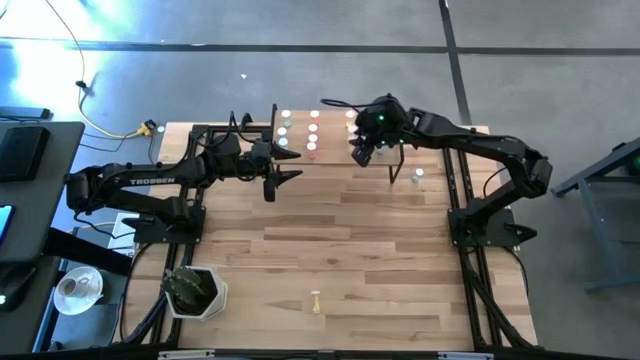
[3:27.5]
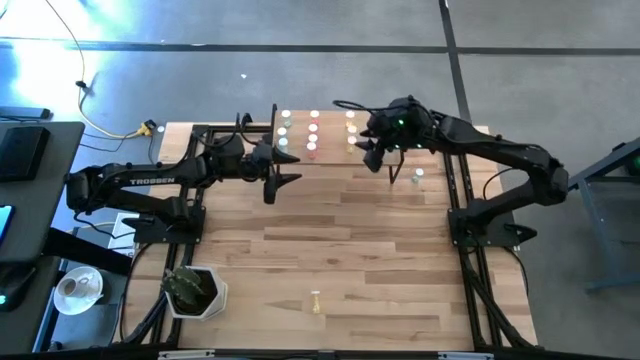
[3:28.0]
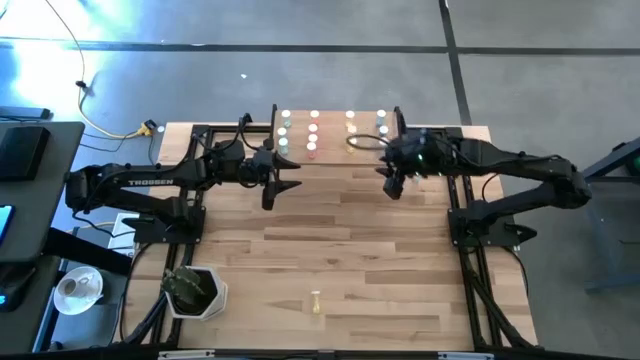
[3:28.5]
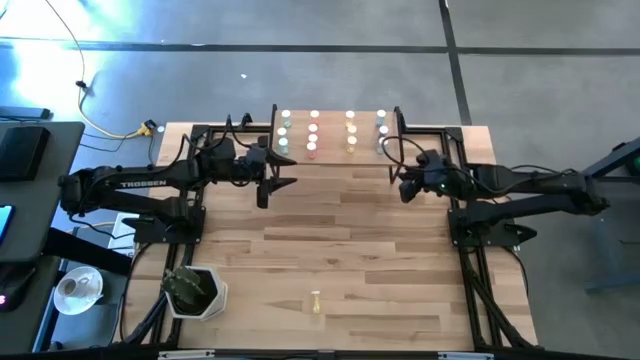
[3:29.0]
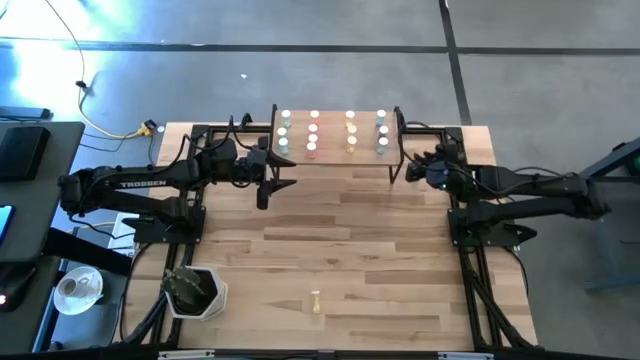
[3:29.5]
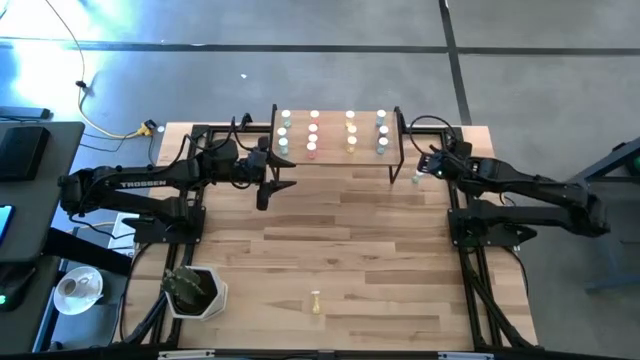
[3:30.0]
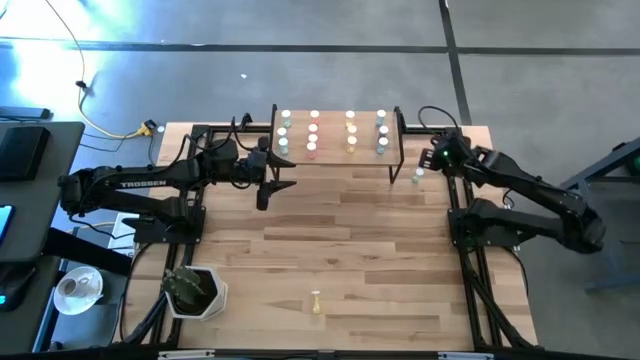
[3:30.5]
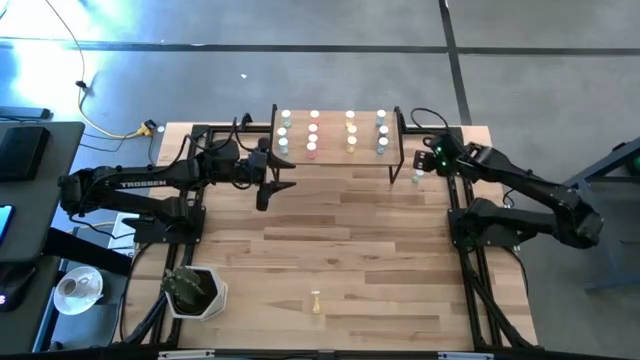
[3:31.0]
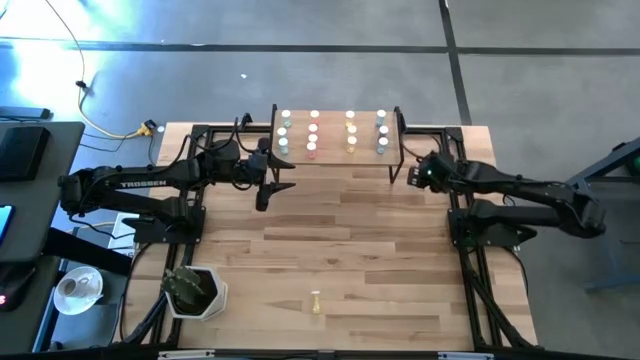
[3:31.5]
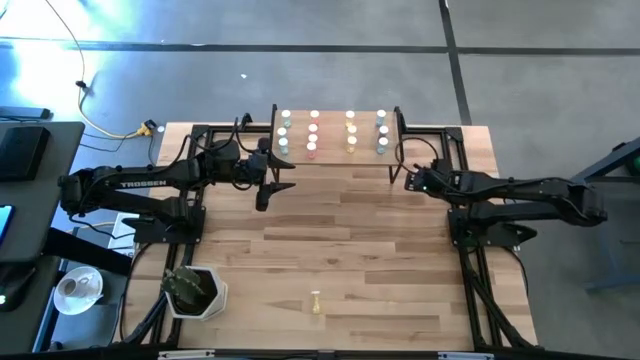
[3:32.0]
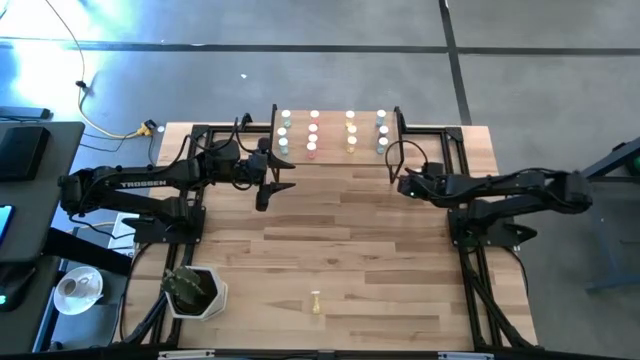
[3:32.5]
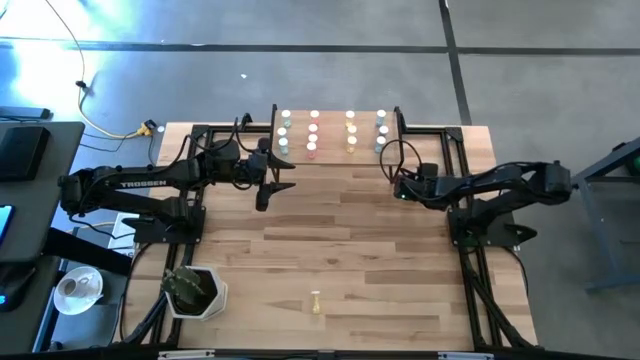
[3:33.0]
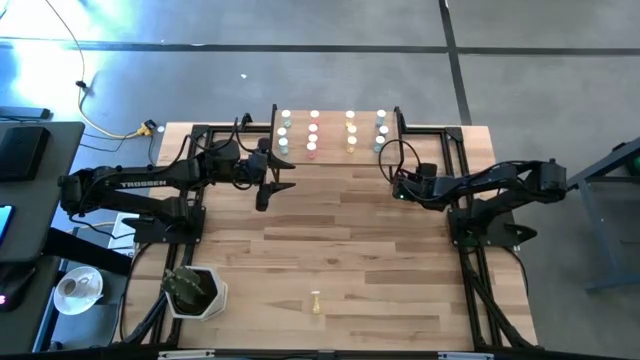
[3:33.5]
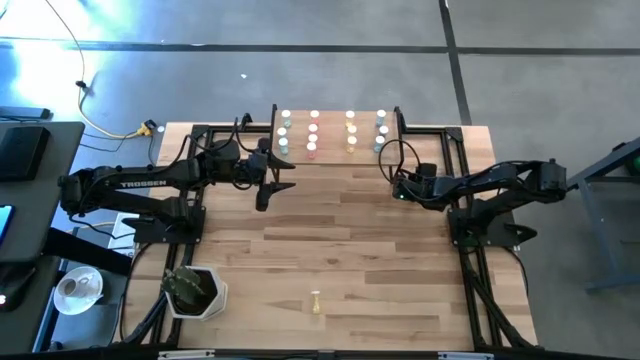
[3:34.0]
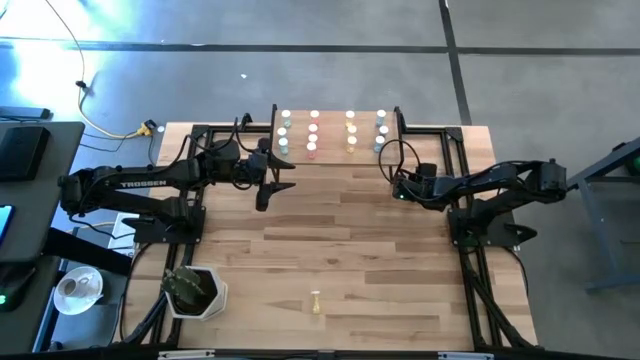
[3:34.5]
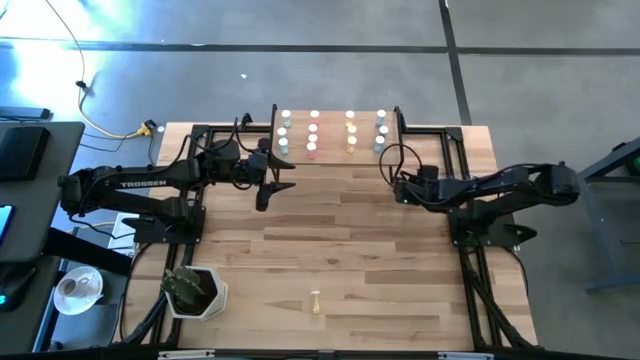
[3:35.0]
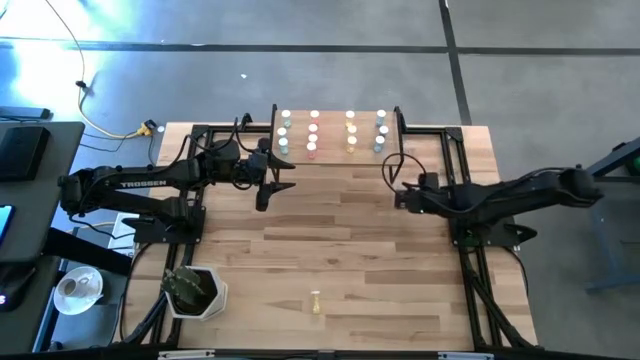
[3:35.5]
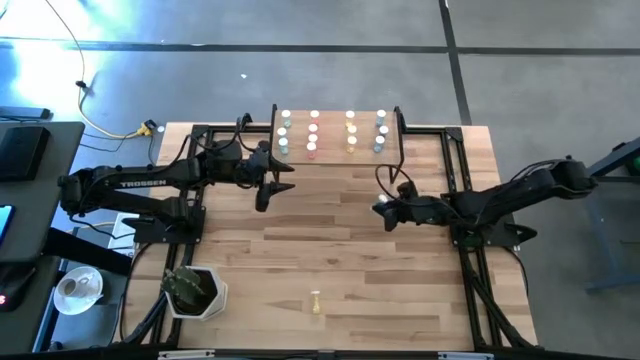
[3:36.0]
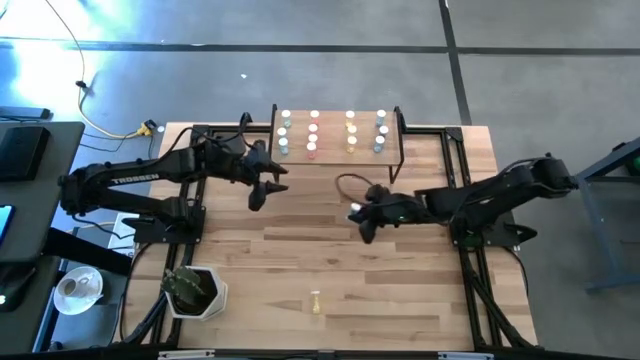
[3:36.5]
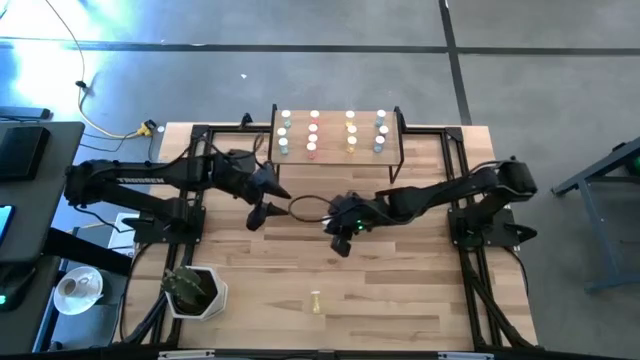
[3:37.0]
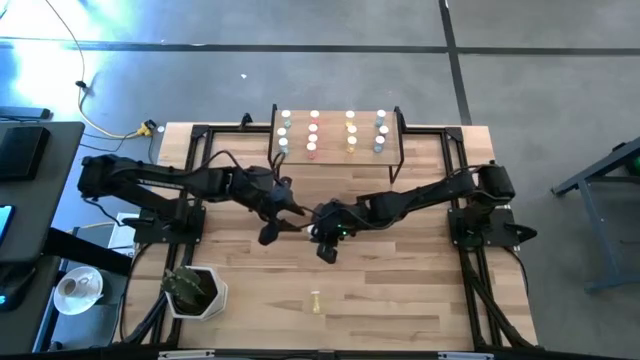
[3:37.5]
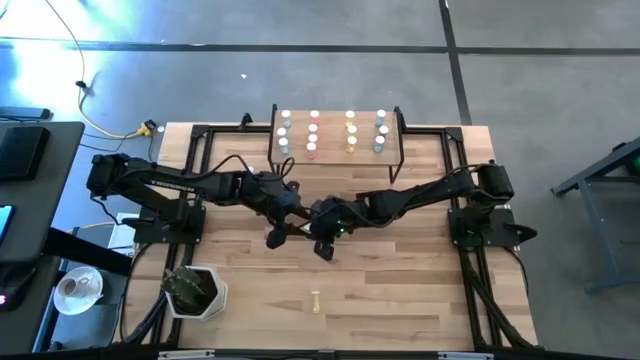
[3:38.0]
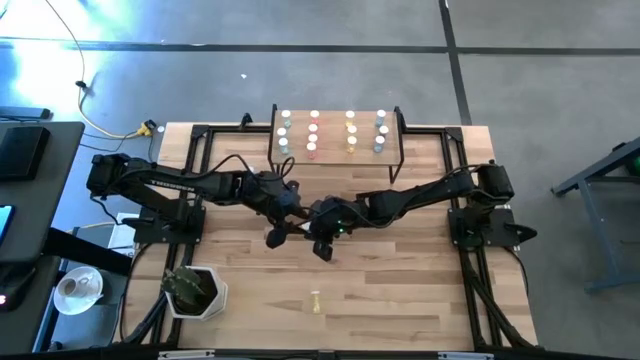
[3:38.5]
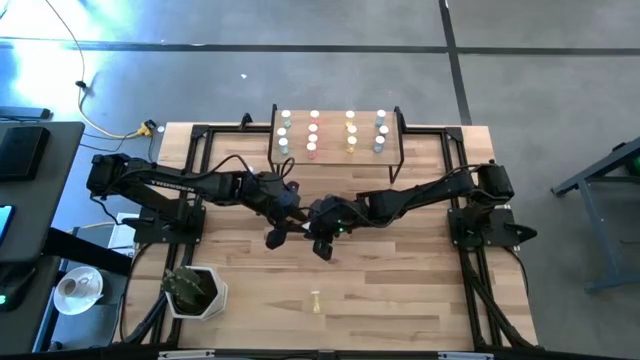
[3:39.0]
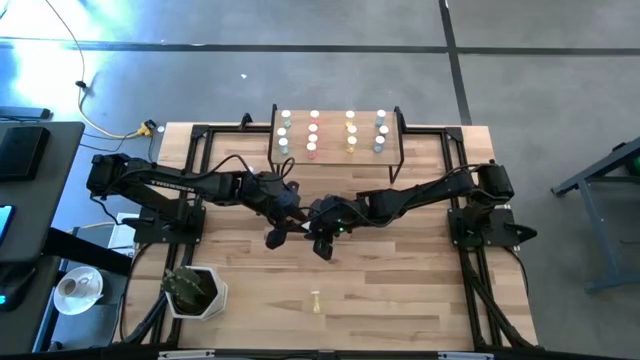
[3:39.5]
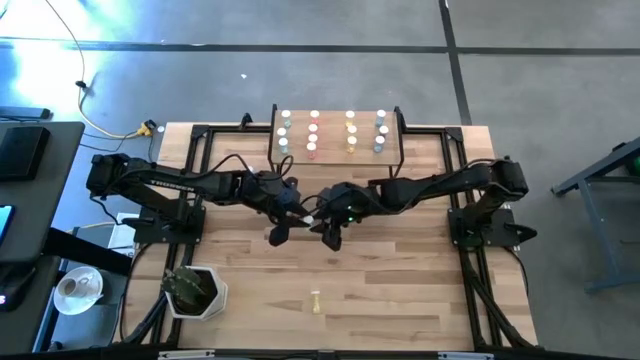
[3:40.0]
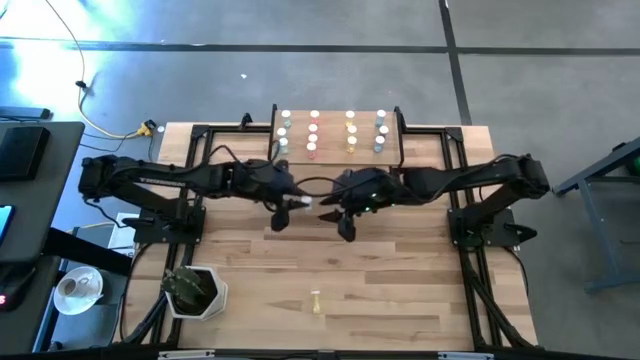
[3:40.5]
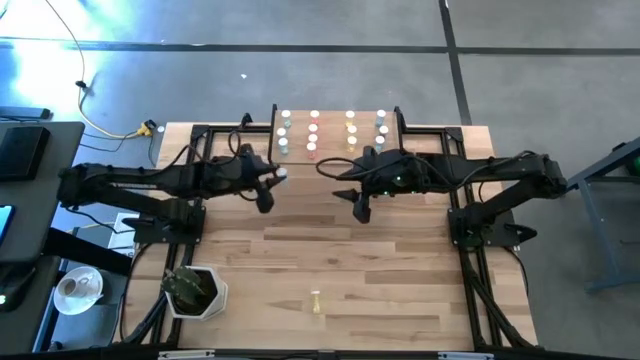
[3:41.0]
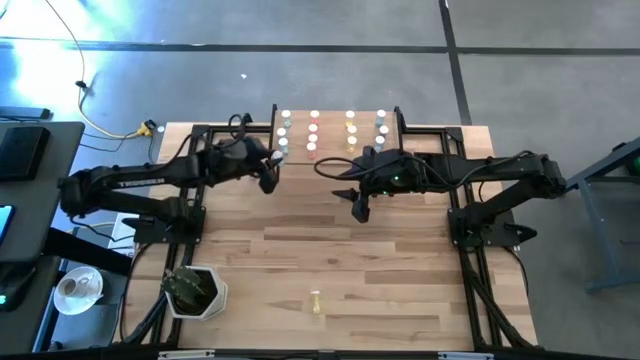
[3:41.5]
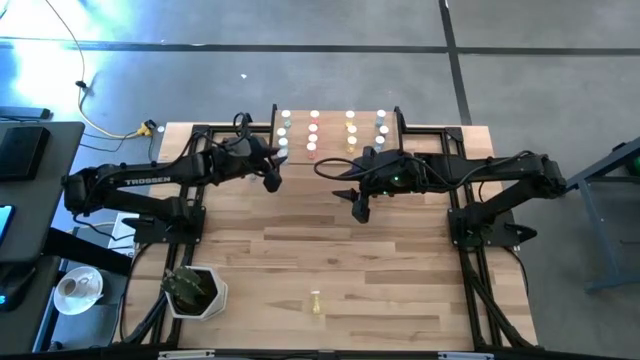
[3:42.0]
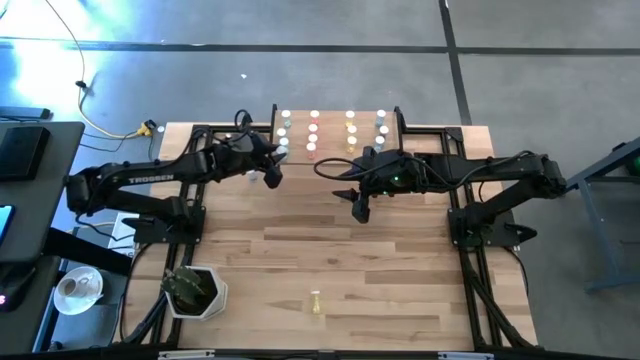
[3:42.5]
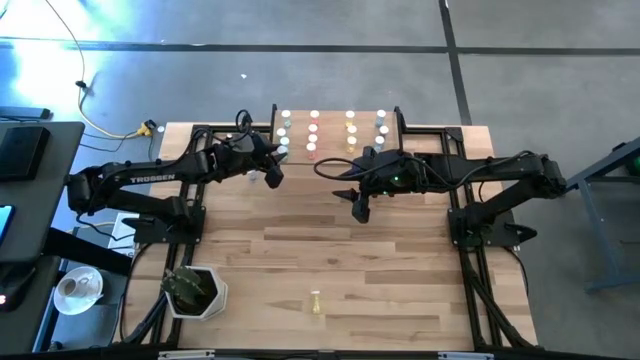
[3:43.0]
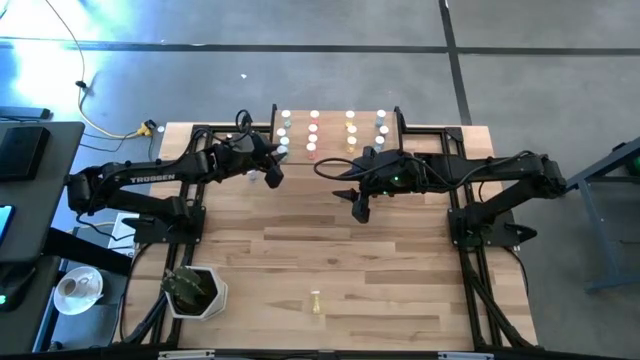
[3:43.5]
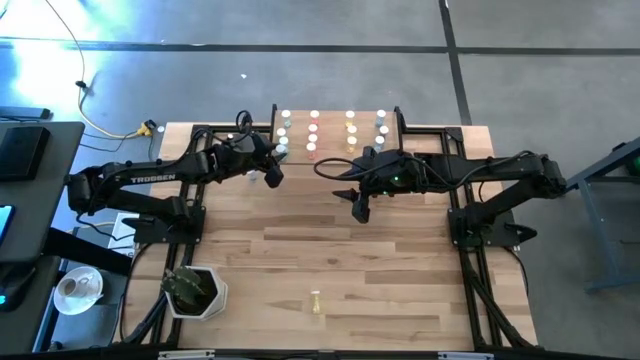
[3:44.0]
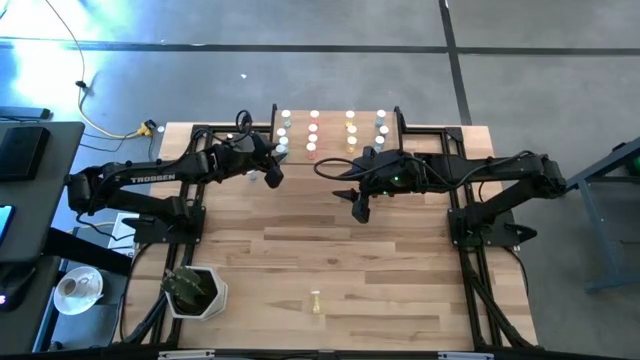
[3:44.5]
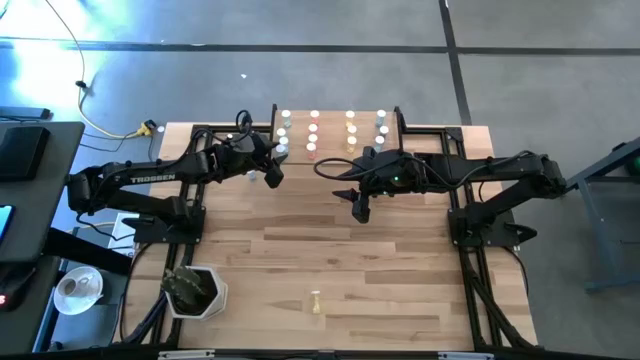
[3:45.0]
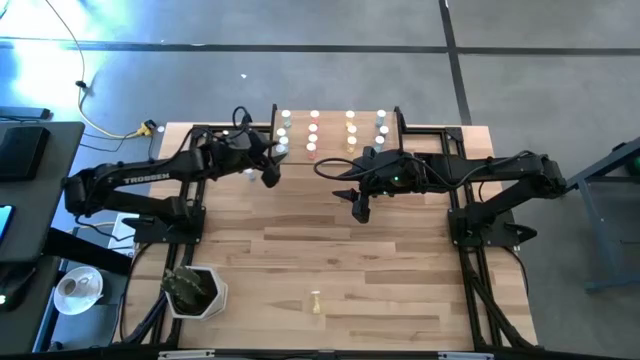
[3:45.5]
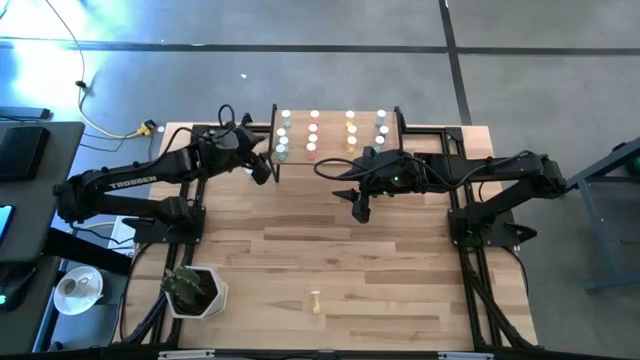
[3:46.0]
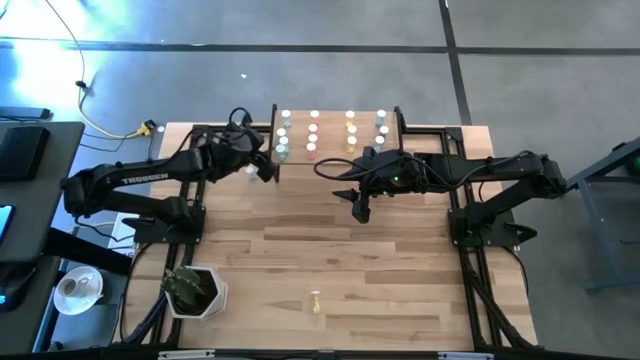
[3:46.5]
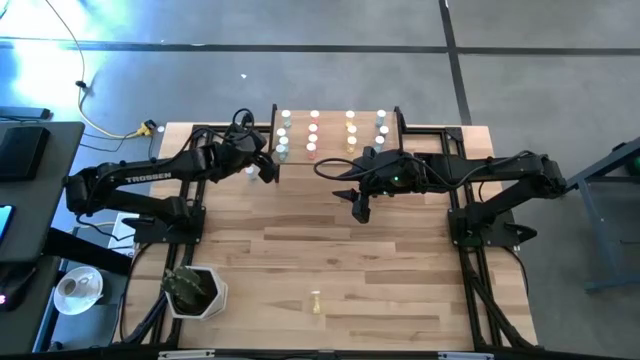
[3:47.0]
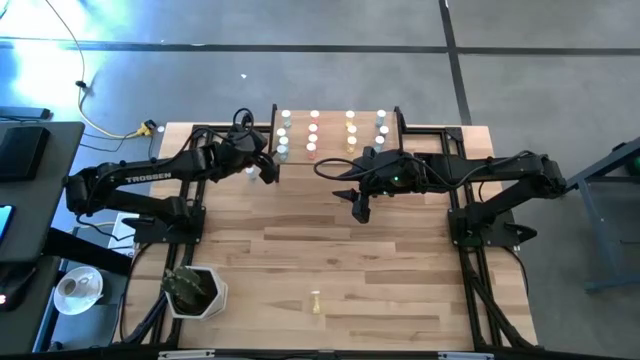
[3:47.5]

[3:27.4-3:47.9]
Task: Pick and place medicine bottles onto shelf by color
Put the green pill bottle on the shelf

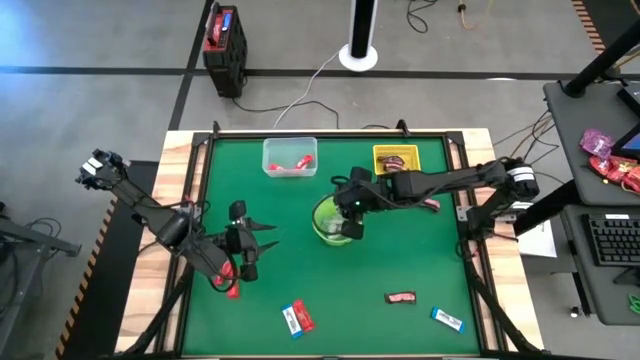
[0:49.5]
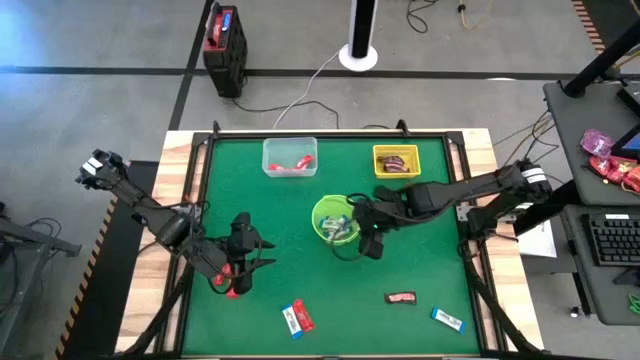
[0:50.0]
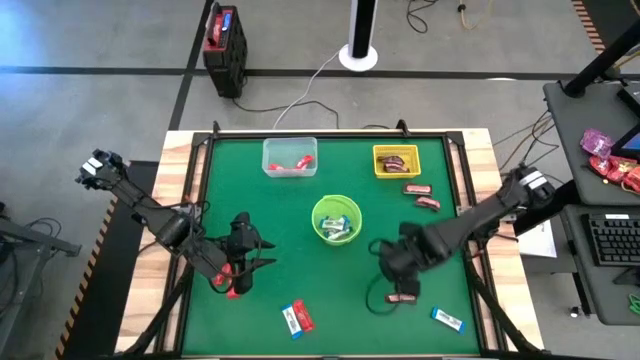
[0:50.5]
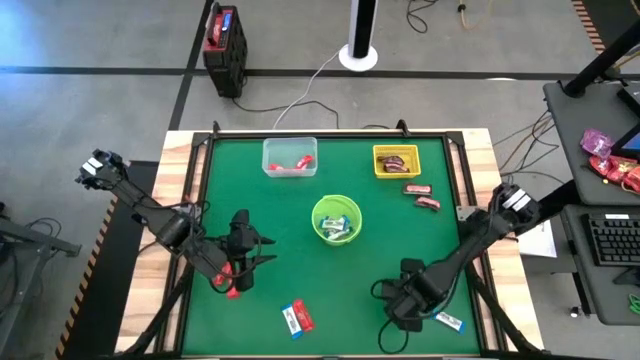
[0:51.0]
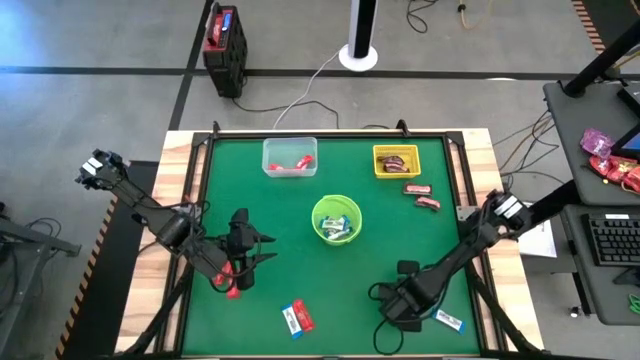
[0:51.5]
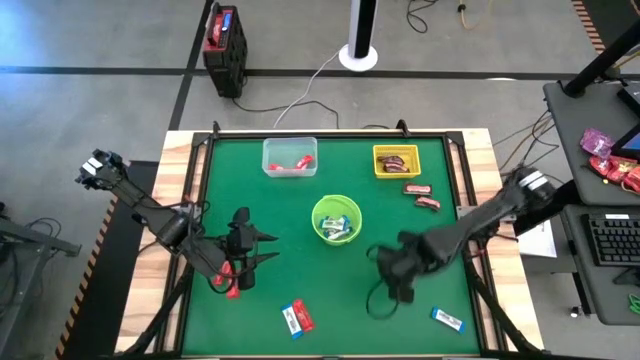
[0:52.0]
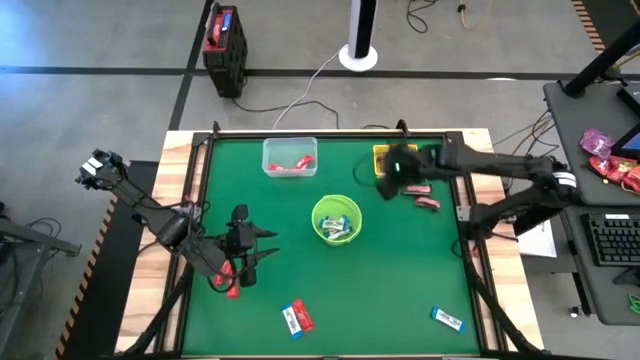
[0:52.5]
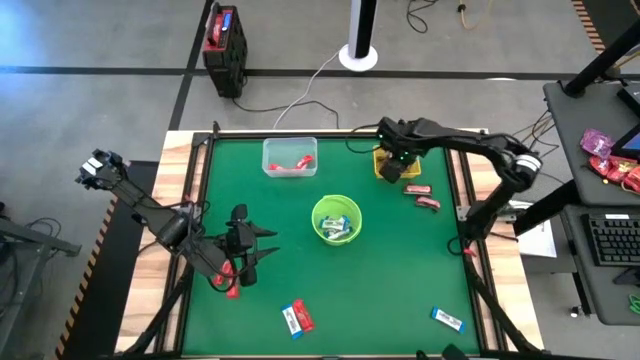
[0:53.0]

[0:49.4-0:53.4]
Task: Sort candy by brand, put in halloween buckets
Put the brown chocolate into the yellow bin
